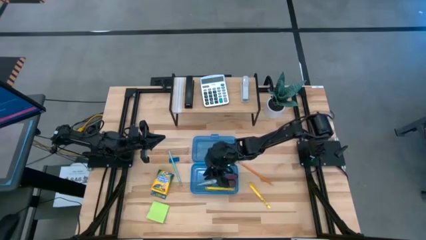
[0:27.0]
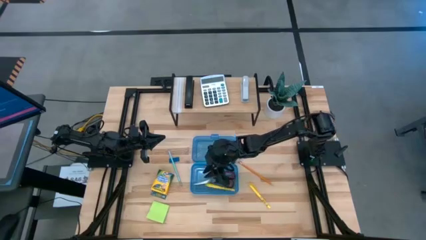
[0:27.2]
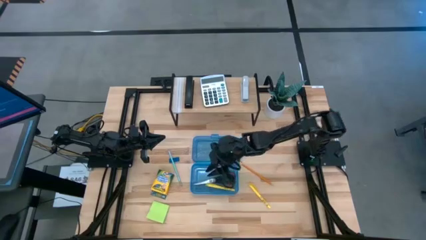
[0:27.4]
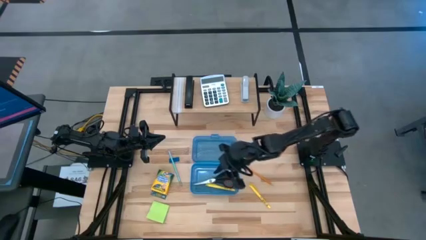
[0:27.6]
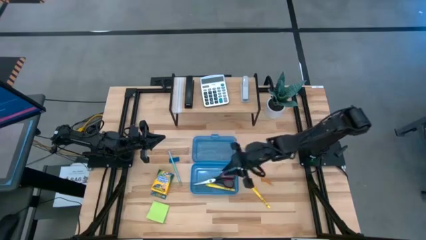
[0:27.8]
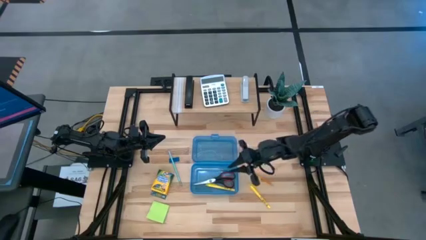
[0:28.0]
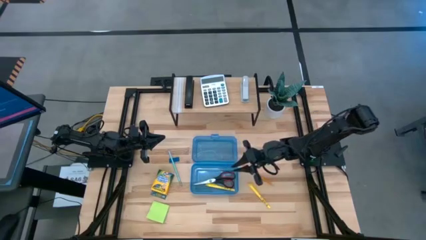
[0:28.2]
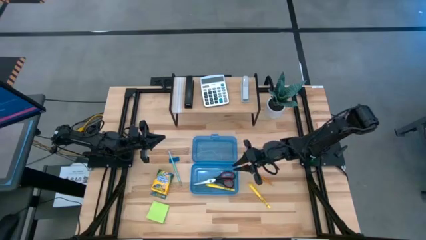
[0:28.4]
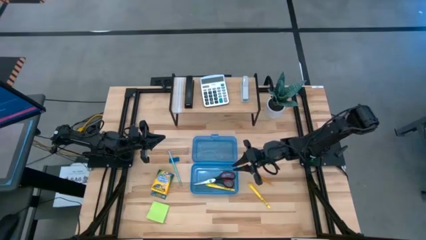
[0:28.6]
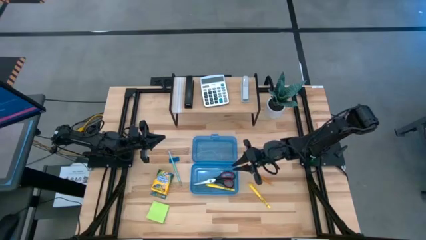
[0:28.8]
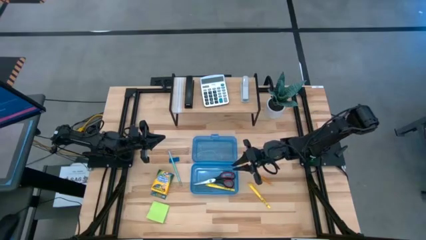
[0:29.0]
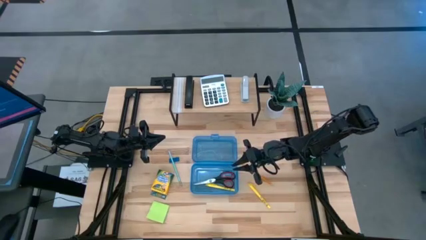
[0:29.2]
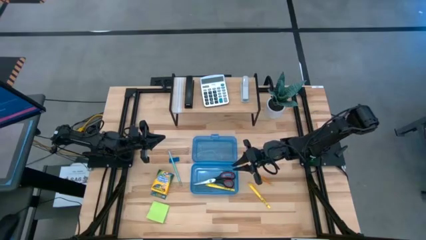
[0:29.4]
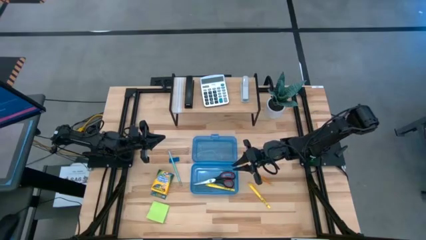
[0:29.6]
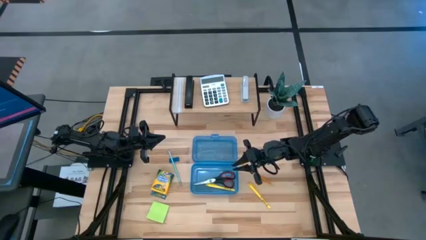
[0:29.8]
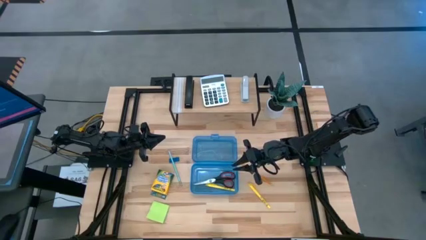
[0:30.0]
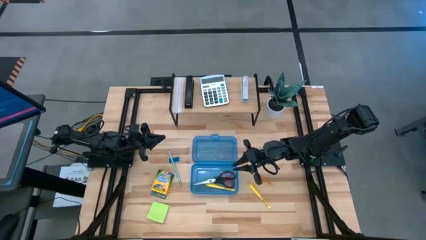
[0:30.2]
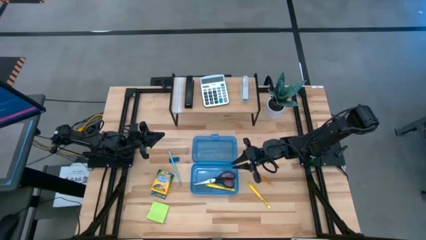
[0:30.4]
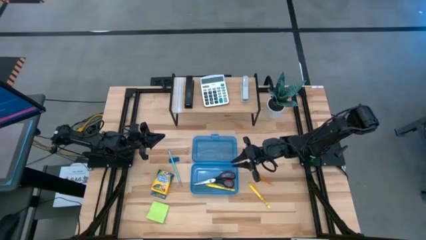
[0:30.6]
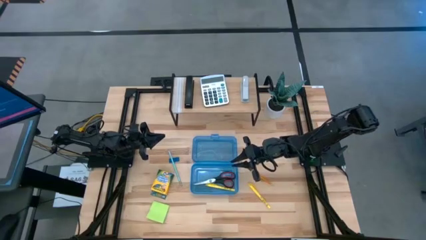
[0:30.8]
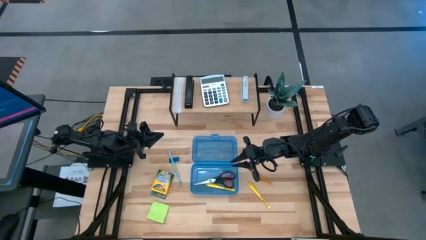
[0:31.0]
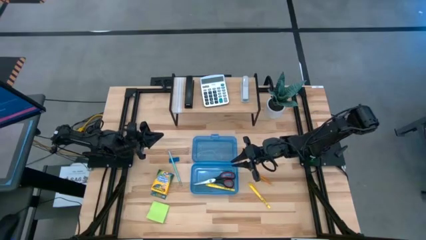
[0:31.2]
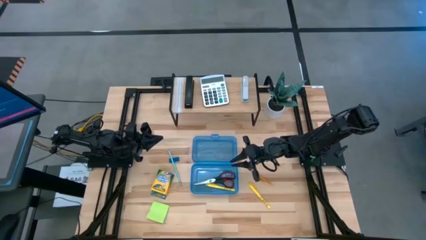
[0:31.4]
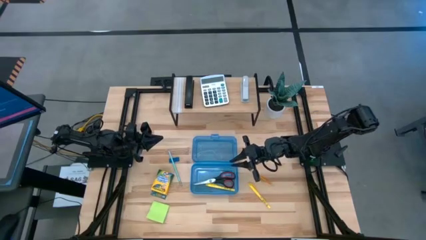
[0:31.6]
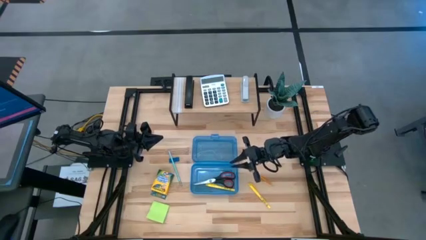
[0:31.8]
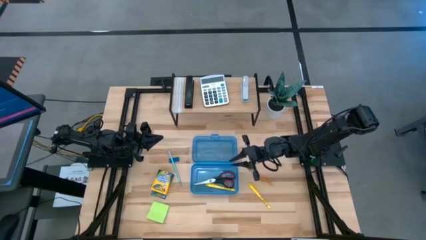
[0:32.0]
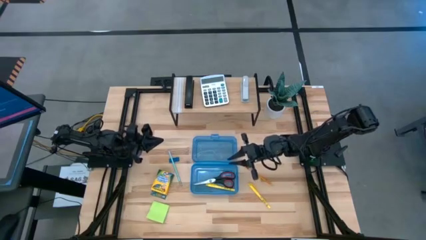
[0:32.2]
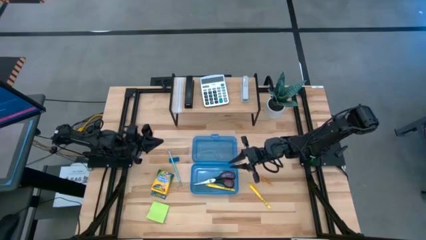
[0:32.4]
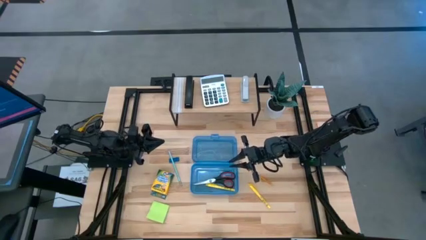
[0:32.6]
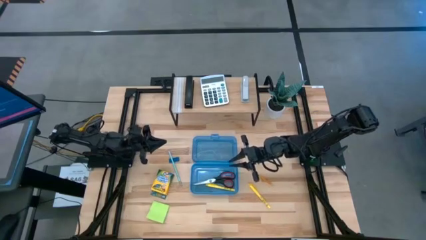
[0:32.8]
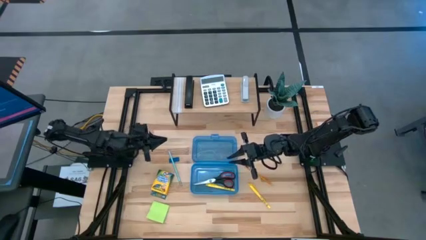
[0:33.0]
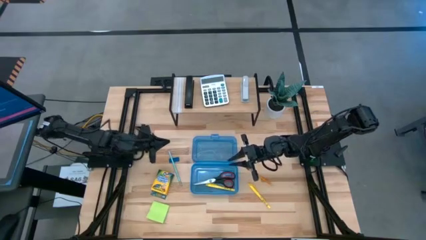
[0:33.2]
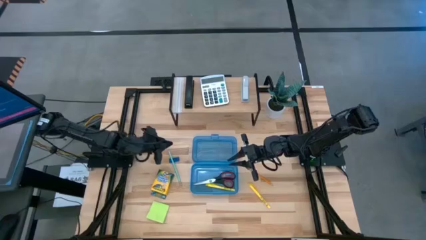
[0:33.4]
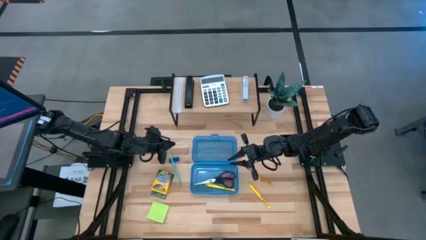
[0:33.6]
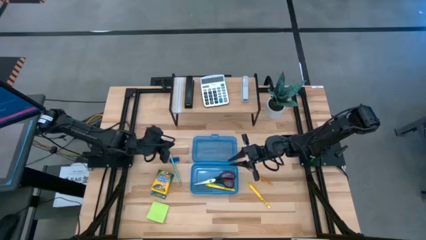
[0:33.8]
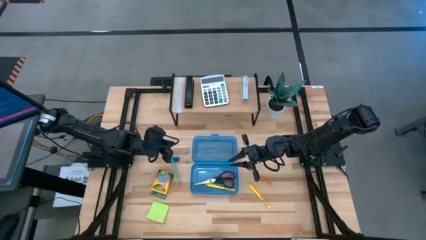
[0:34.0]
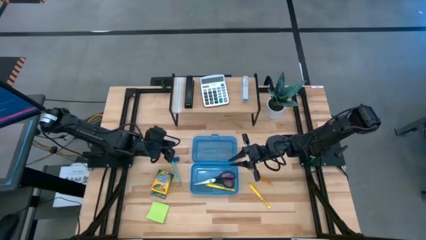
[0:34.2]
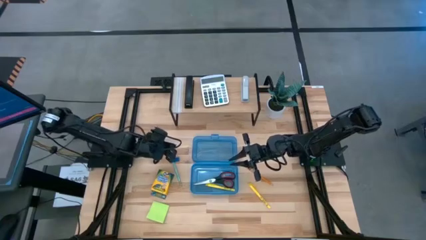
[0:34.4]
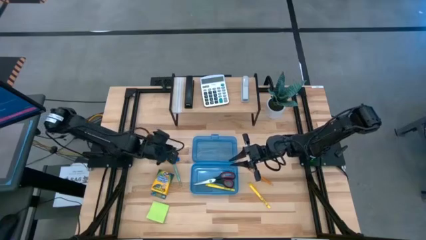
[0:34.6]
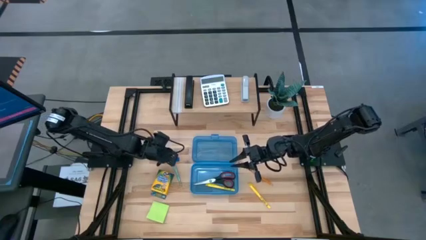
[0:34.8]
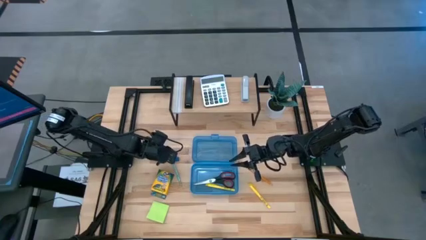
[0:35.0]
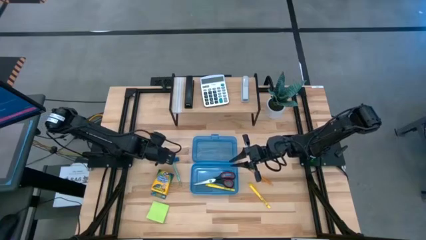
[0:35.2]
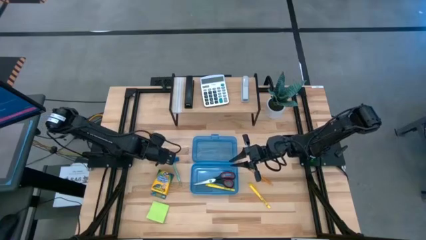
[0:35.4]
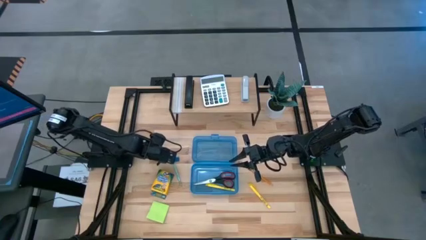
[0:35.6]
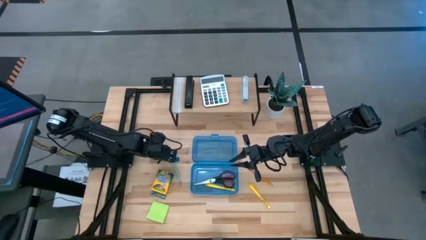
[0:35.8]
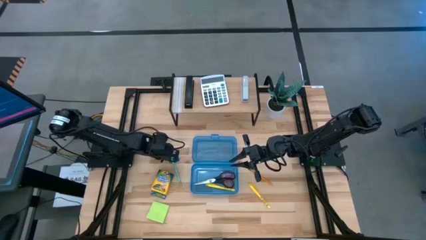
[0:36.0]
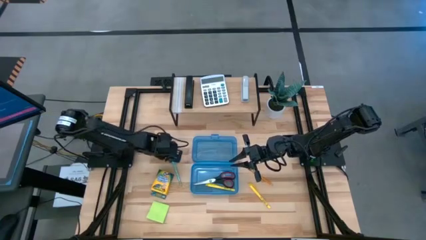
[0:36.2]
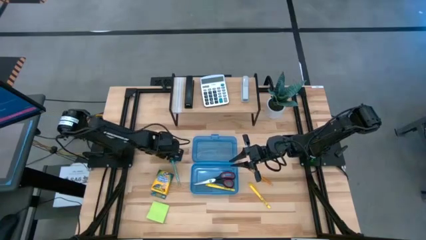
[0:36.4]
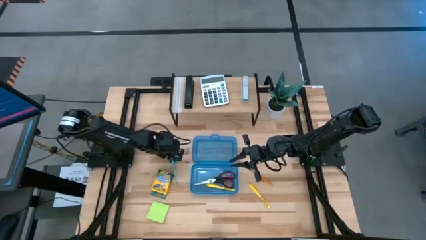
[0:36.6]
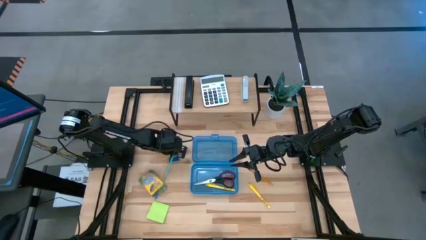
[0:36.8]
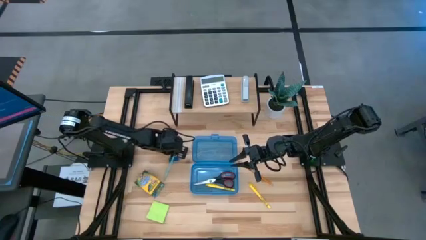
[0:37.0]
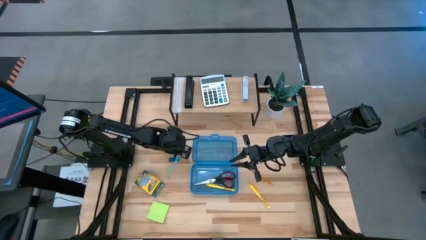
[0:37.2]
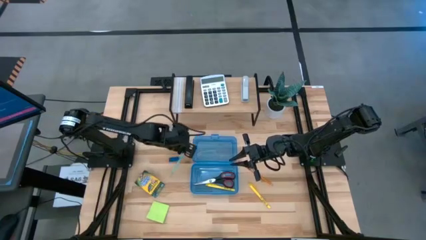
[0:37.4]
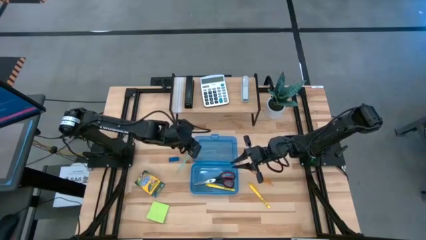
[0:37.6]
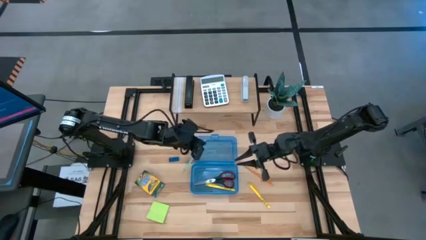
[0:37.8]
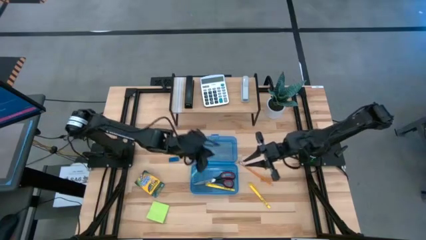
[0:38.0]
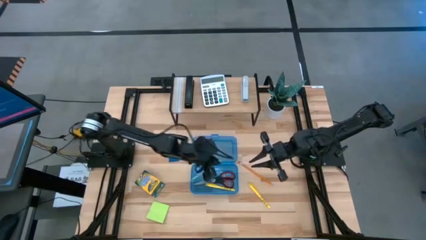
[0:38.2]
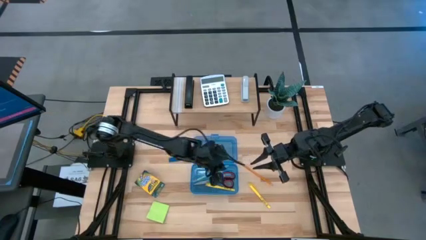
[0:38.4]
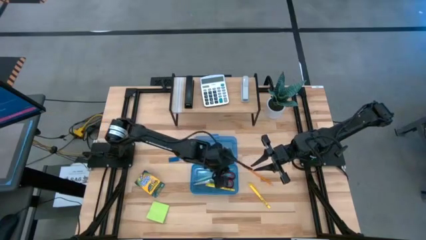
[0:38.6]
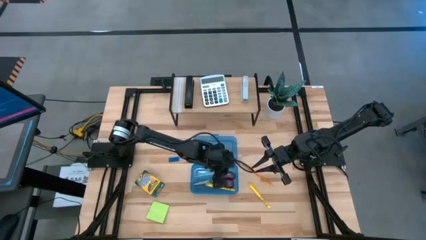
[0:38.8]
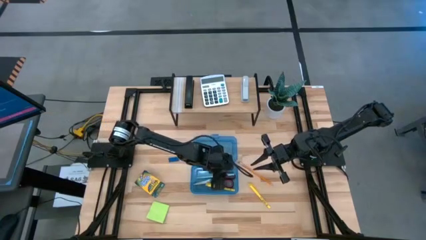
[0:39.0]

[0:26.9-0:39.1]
Task: Pack school essentials
Put the blue pencil into the blue supply box

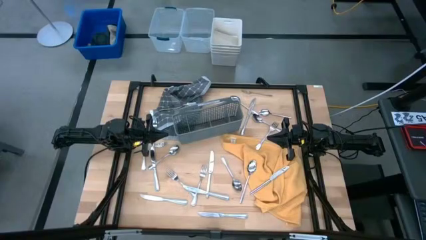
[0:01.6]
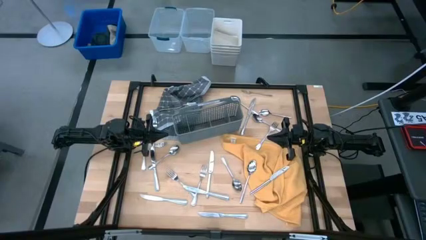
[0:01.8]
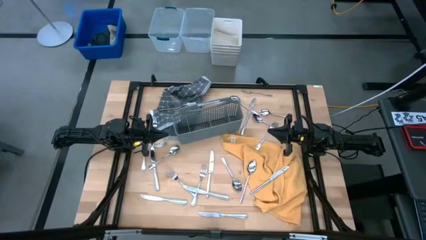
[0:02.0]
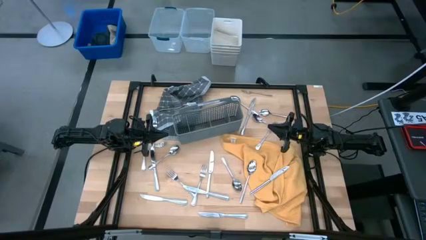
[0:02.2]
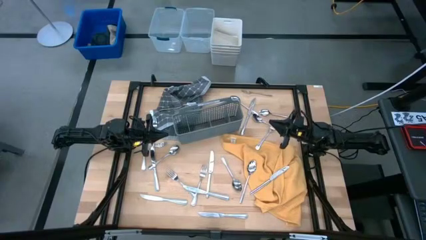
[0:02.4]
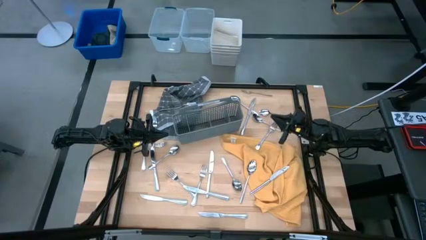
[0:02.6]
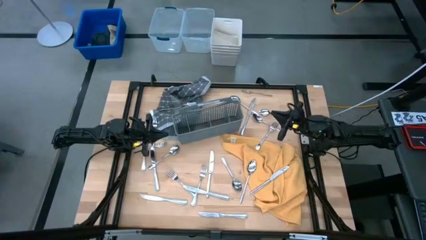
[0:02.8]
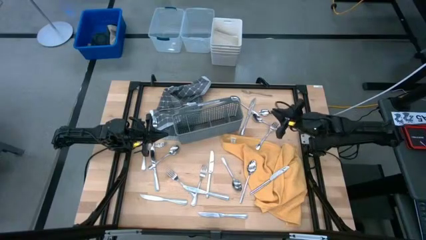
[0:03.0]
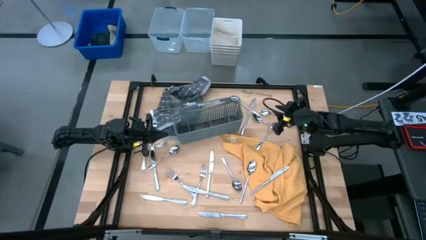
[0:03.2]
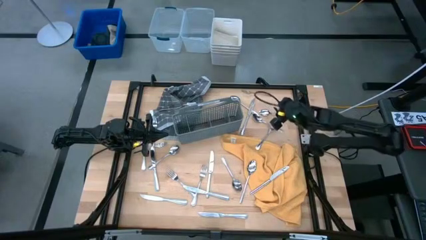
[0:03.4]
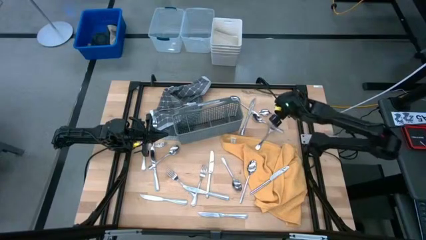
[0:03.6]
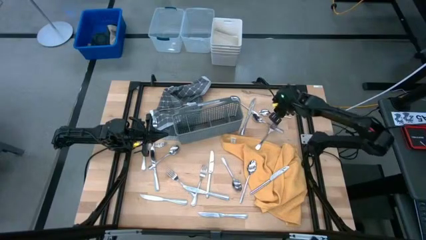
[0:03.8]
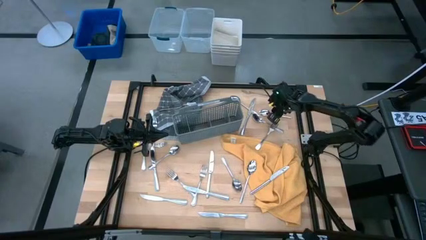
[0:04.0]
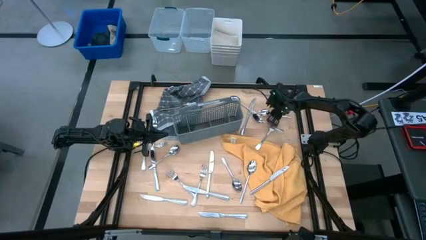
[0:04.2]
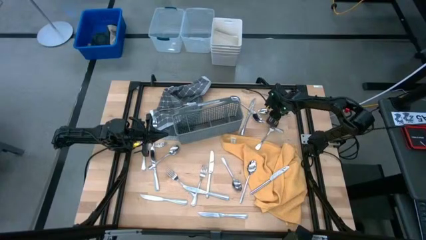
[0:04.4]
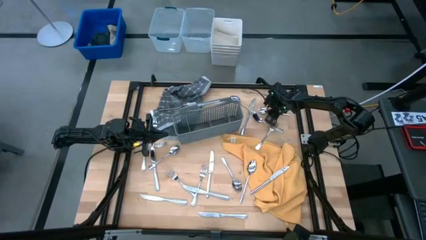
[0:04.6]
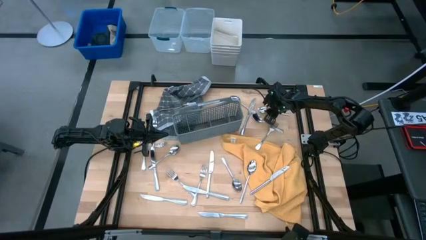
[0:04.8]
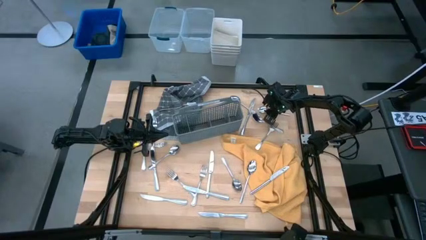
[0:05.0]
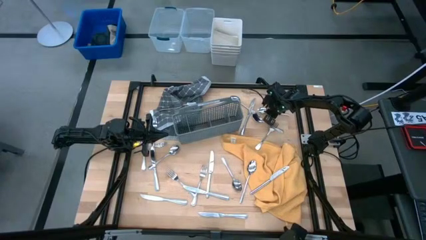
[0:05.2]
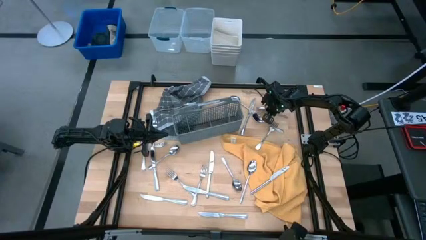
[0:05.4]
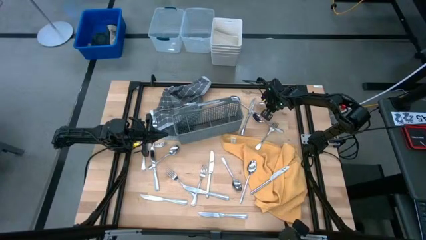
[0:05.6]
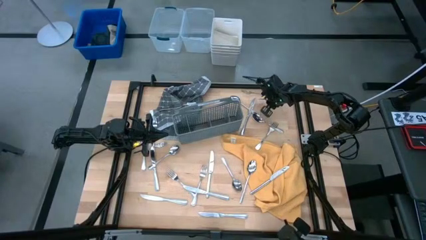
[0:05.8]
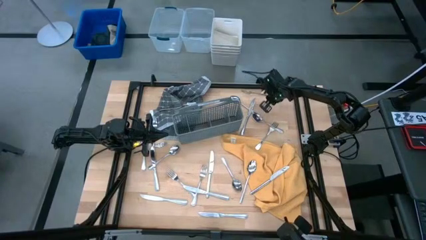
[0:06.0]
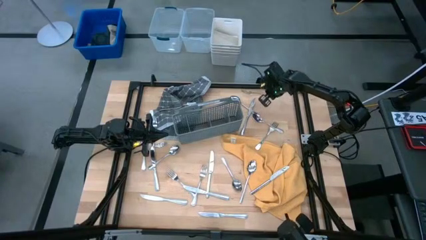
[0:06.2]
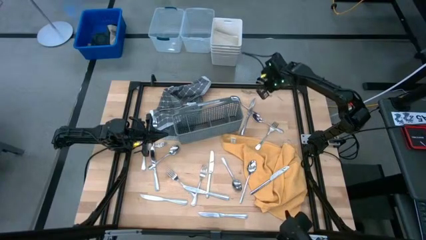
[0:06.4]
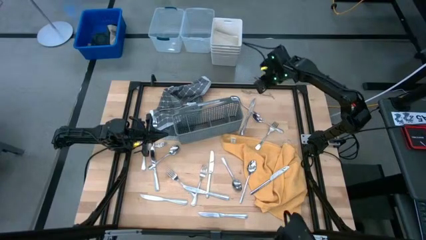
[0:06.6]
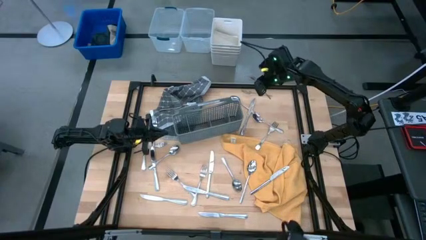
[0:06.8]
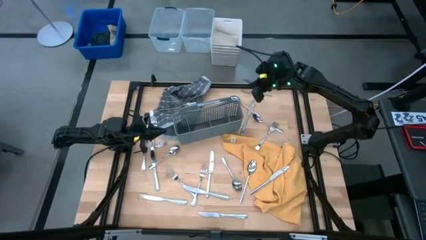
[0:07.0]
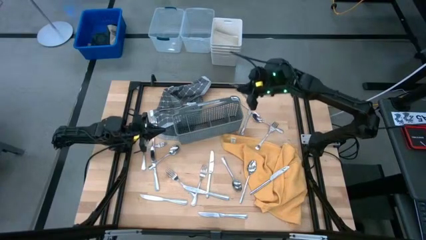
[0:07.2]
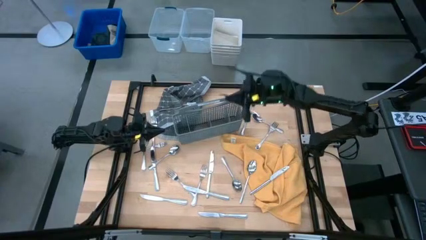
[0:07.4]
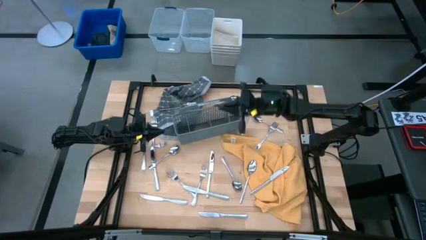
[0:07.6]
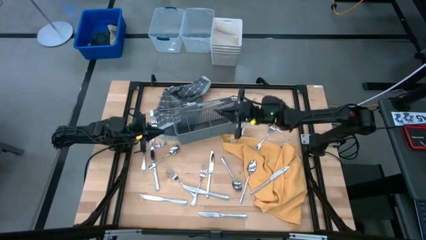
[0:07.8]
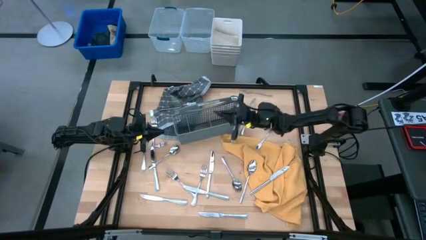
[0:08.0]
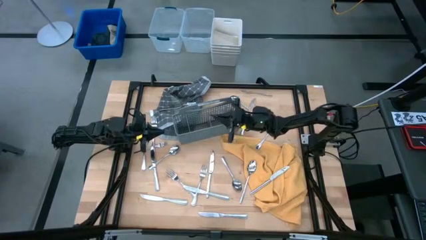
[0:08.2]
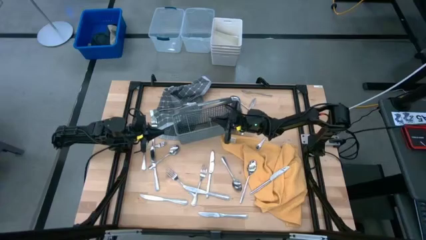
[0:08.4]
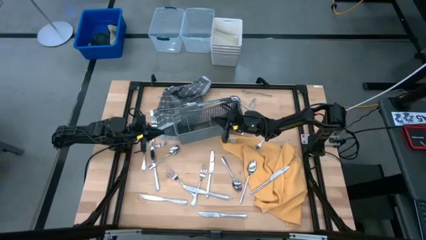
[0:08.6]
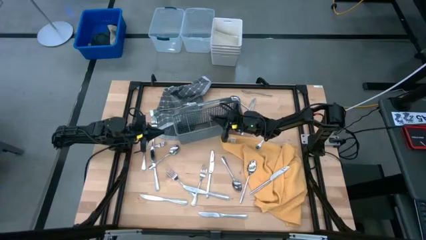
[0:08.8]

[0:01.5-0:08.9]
Task: Sort silverware
Put the silver spoon into the gray silverware basket
